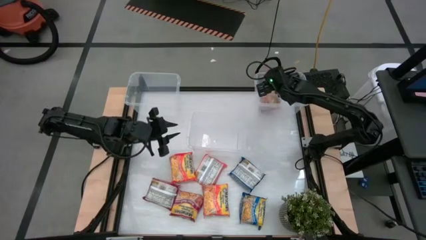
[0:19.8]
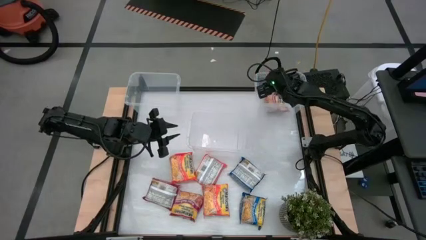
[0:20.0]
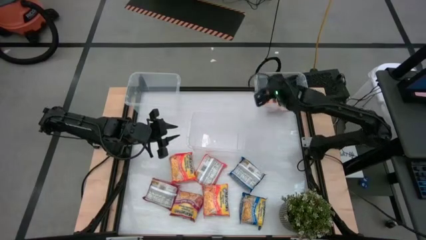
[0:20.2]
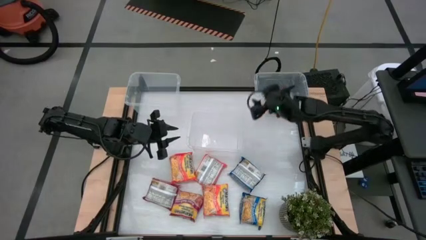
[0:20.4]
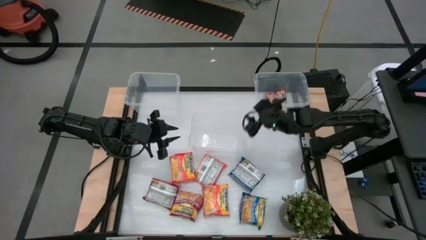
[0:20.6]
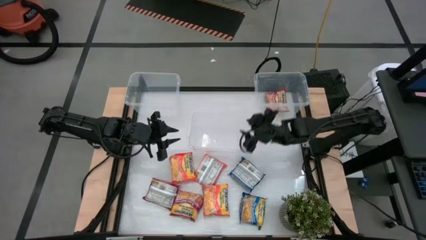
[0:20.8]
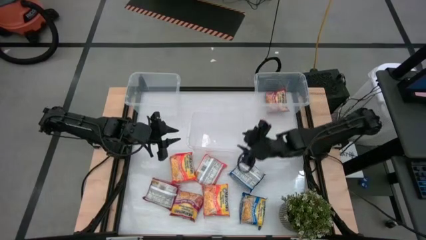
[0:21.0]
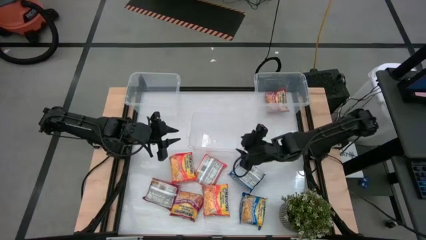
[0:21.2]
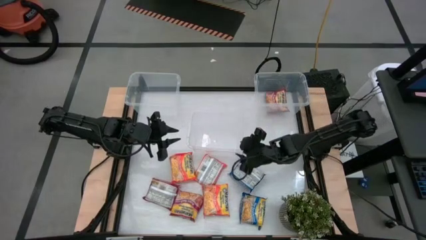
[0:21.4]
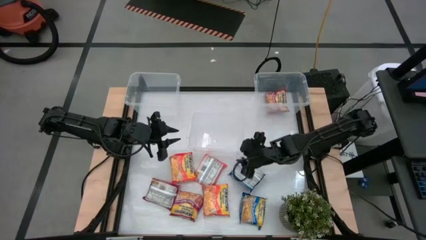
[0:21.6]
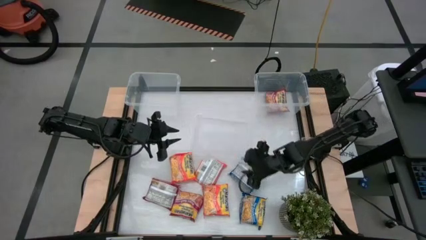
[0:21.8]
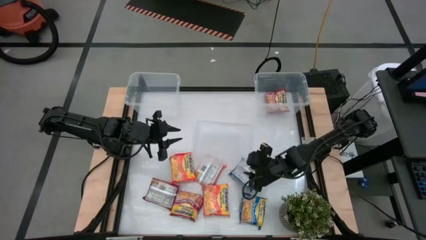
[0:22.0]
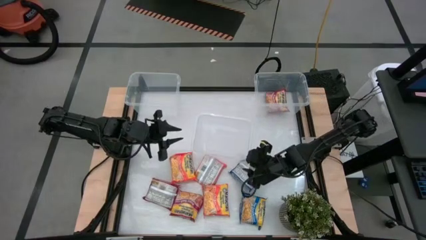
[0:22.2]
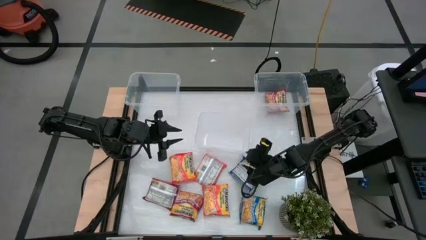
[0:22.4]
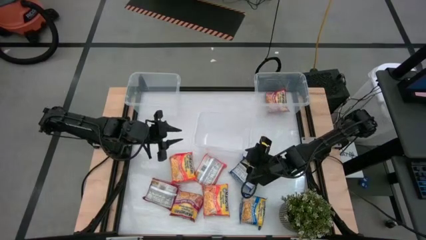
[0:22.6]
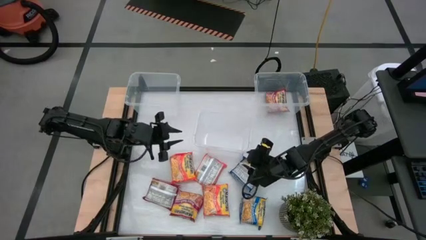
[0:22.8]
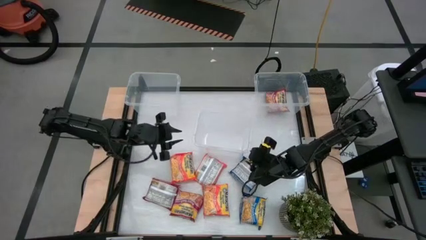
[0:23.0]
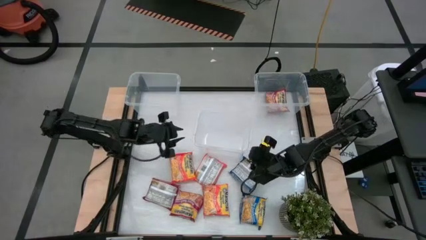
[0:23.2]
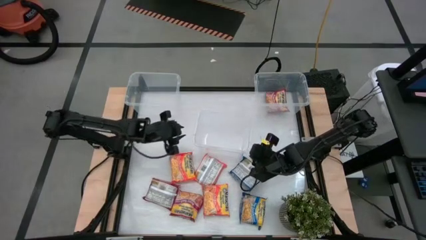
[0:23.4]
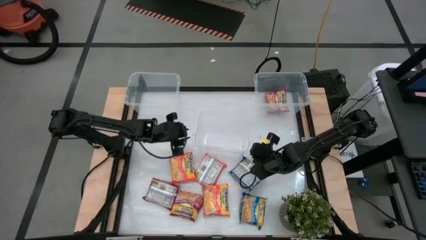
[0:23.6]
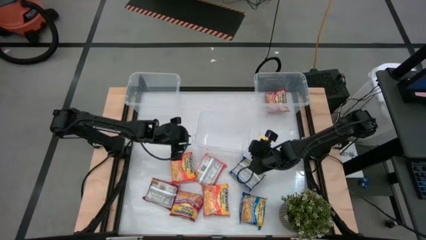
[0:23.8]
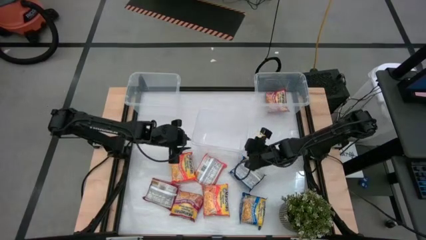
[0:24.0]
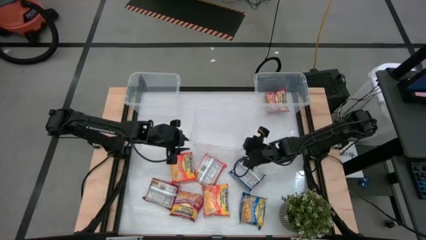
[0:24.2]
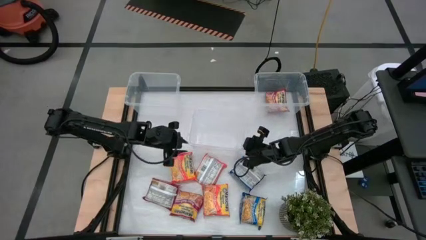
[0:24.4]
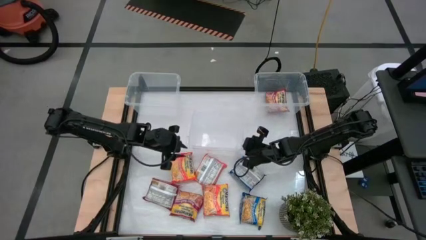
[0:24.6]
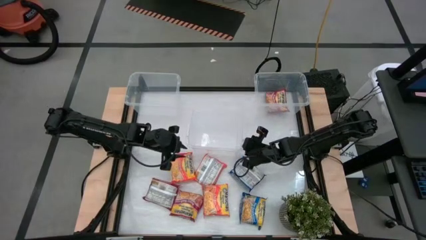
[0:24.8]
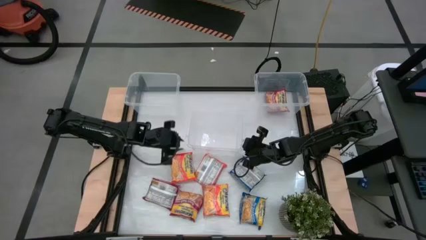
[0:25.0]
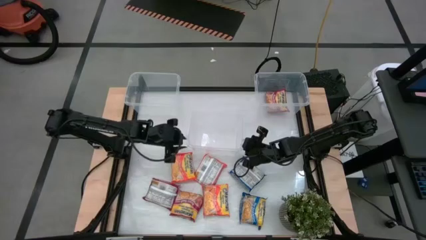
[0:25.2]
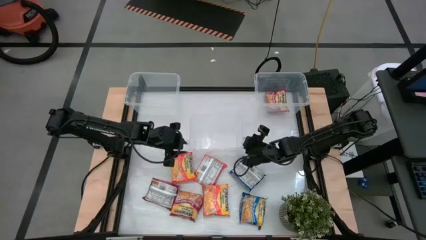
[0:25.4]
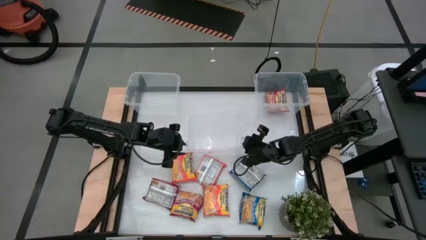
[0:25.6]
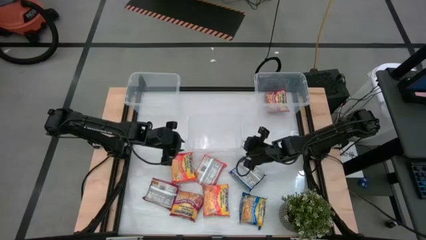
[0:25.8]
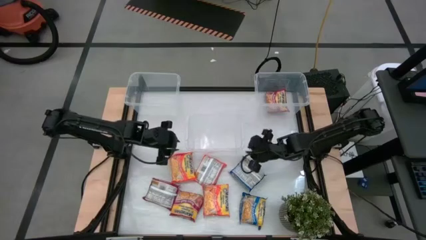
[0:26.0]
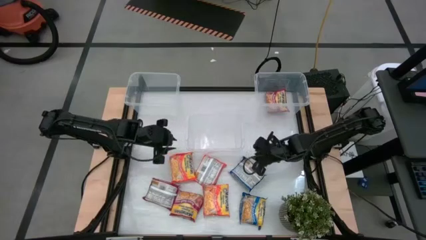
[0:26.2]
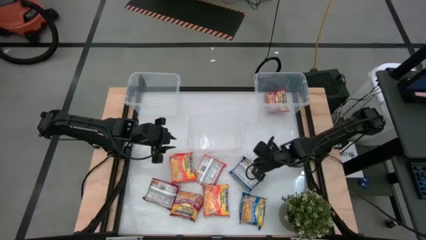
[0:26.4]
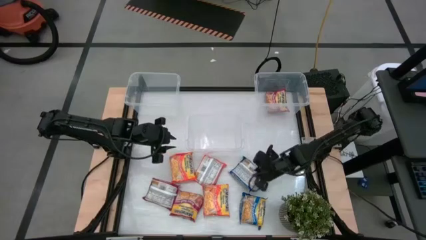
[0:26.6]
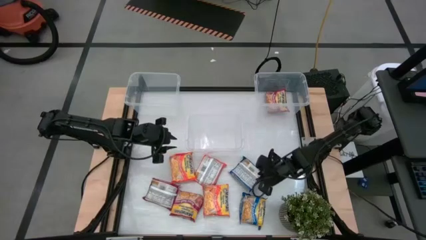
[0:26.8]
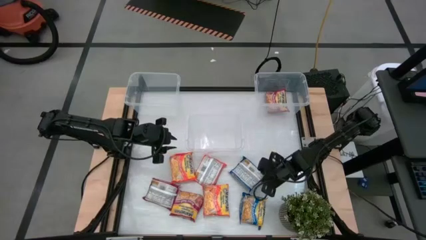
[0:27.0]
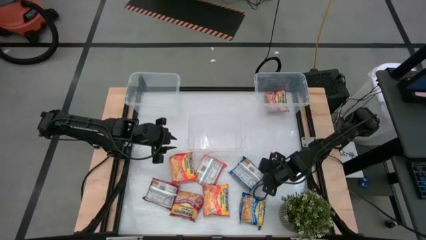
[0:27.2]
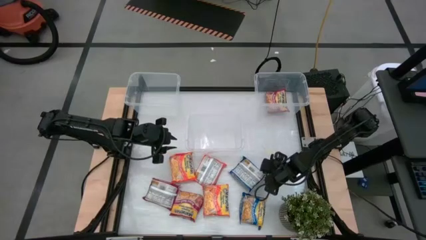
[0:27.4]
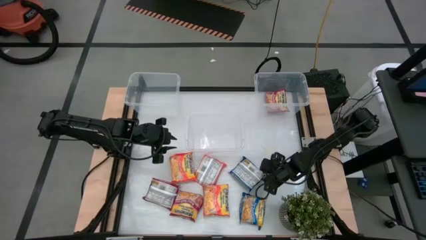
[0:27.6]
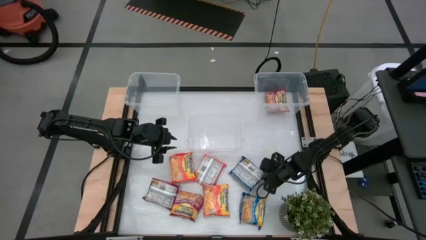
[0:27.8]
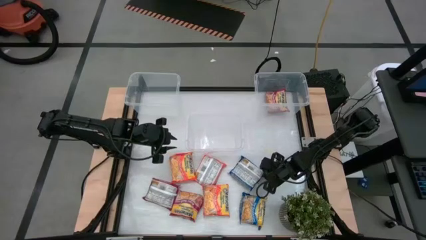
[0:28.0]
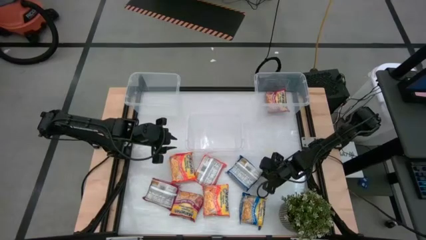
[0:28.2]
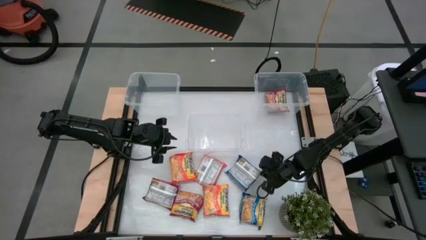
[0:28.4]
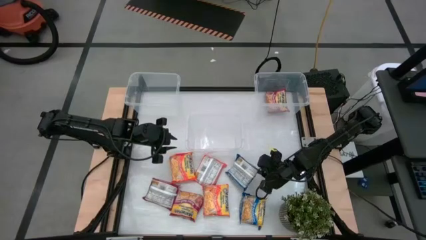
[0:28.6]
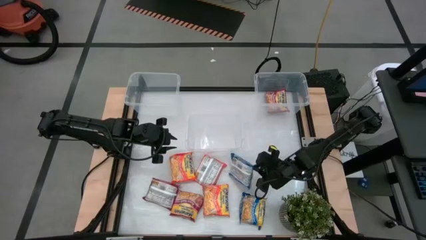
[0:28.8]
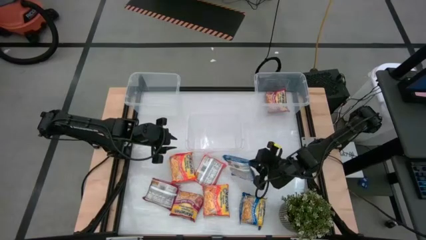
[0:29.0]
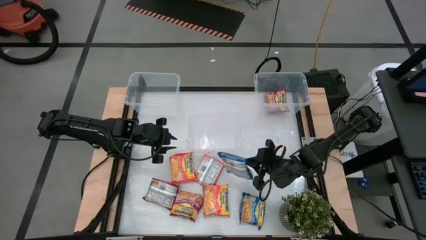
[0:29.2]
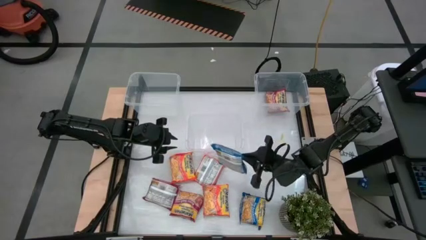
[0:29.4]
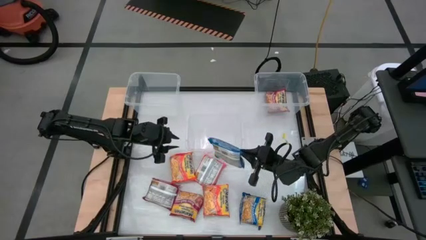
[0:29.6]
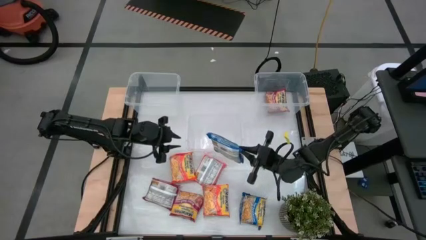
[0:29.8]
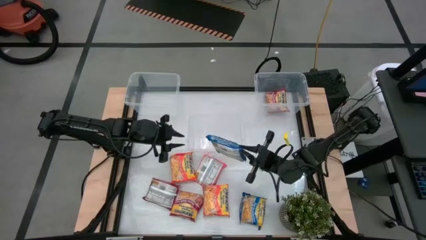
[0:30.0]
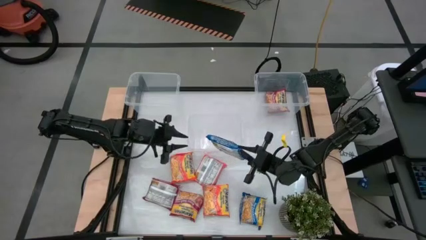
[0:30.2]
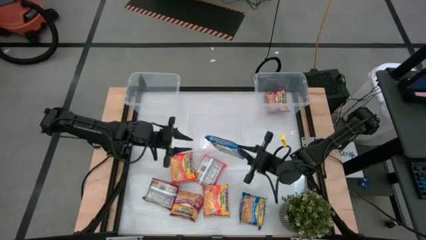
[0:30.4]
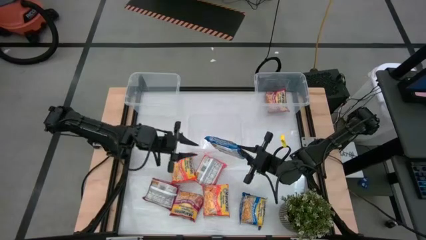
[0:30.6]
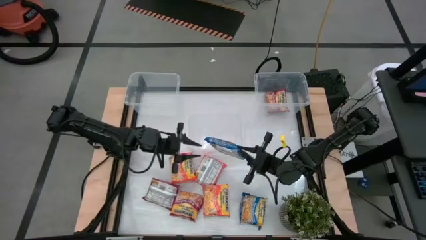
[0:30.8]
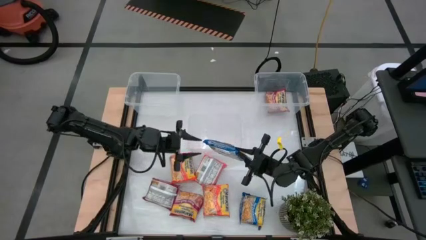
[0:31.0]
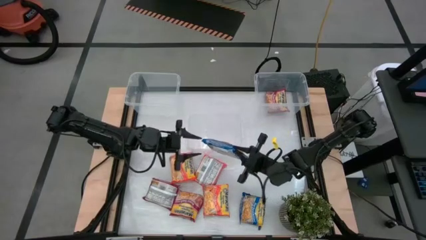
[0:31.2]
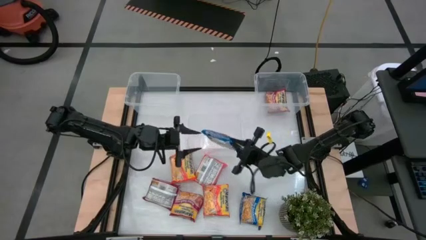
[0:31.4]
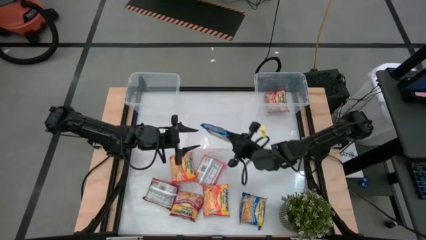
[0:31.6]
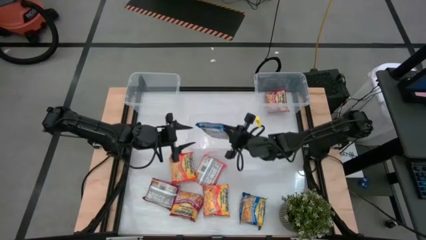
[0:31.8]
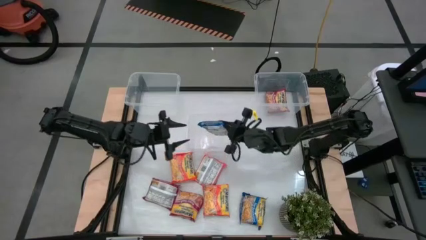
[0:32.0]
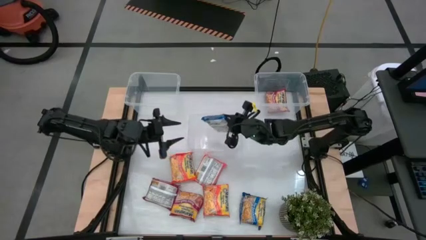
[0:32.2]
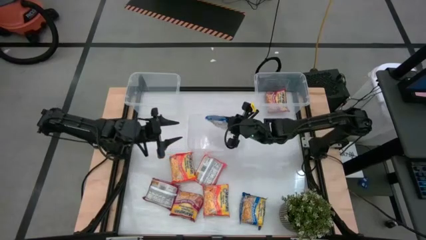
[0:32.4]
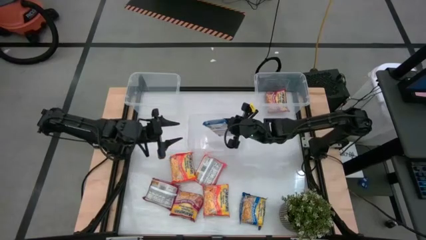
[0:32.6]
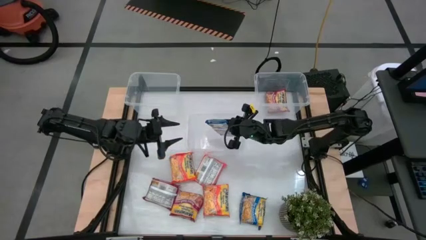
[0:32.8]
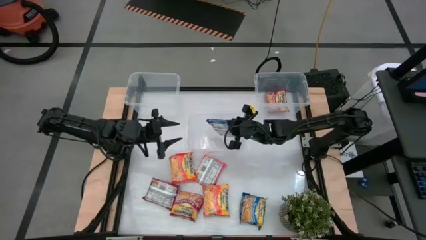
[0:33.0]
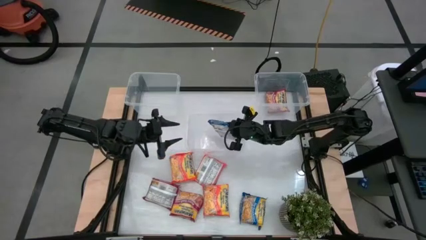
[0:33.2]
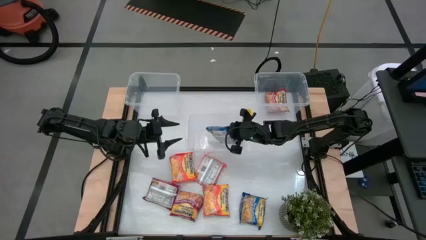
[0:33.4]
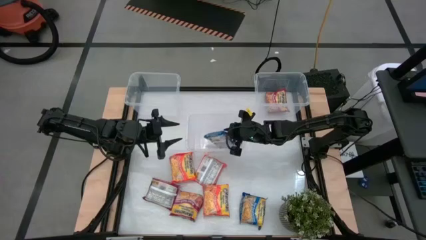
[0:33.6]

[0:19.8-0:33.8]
Task: Sort Maruchan noodles
Put the top blue noodle pack into the bottom transparent bin
